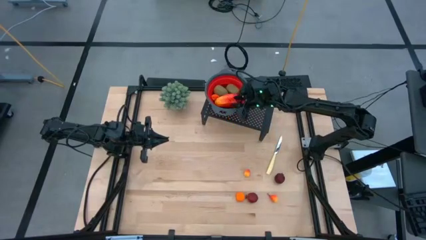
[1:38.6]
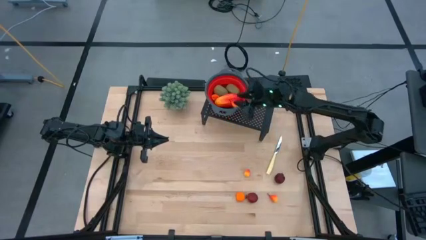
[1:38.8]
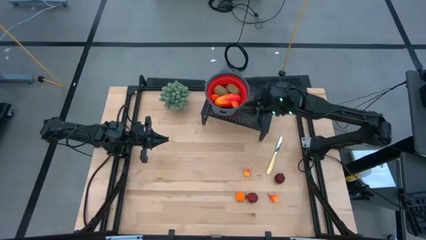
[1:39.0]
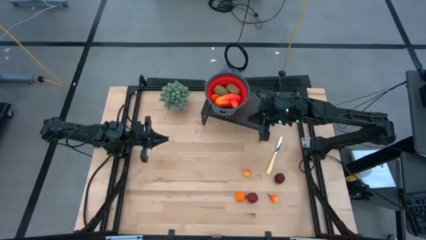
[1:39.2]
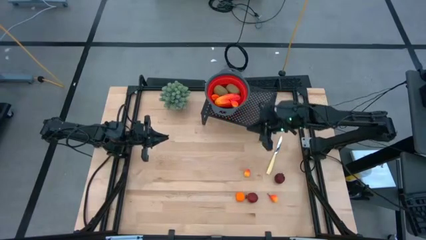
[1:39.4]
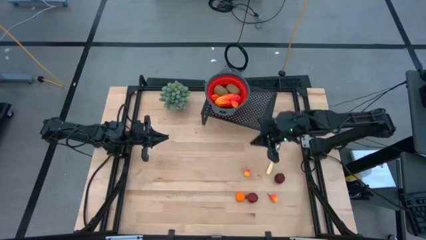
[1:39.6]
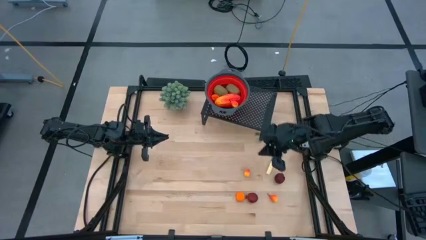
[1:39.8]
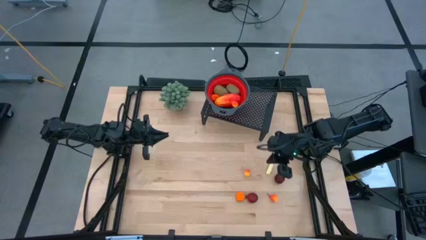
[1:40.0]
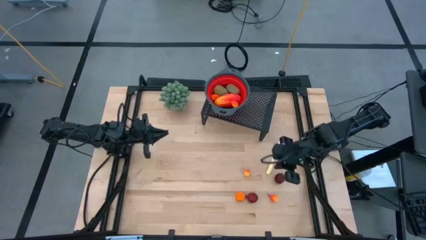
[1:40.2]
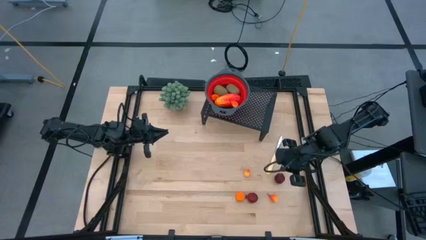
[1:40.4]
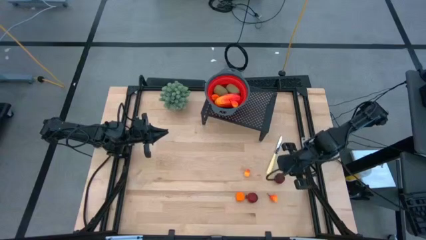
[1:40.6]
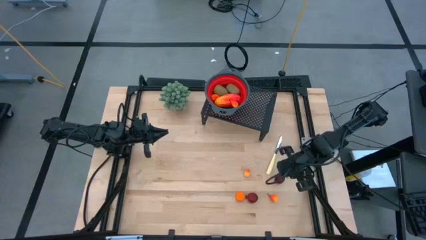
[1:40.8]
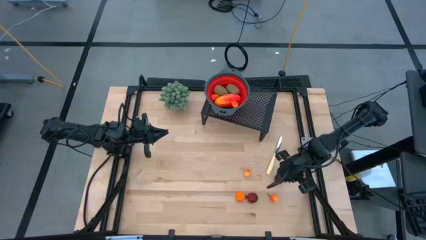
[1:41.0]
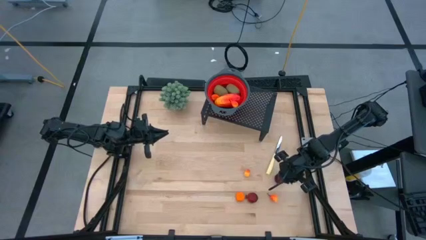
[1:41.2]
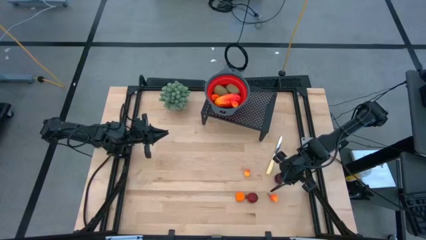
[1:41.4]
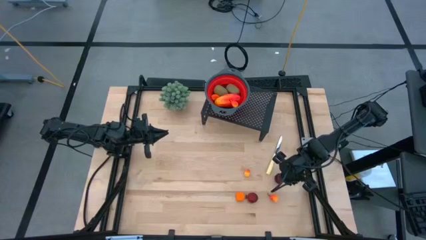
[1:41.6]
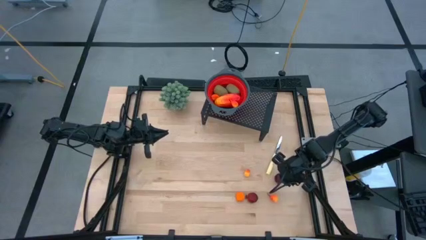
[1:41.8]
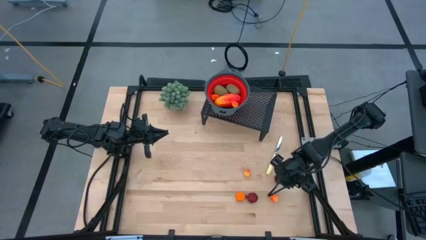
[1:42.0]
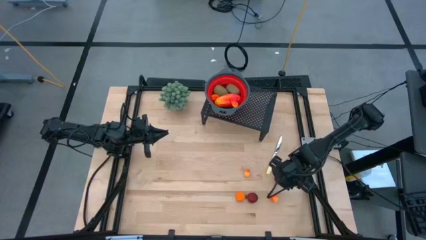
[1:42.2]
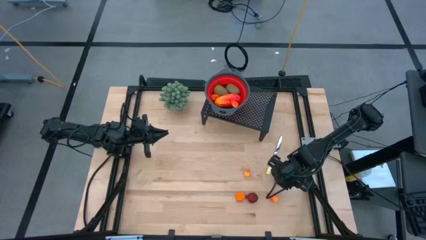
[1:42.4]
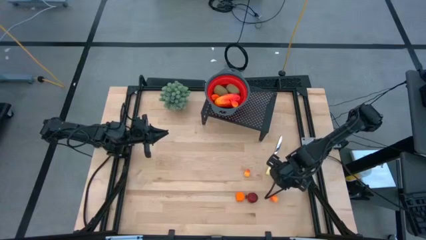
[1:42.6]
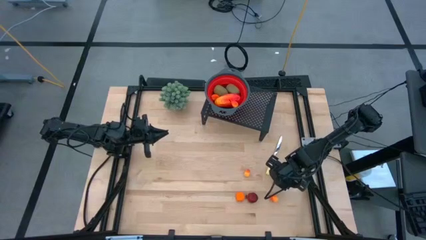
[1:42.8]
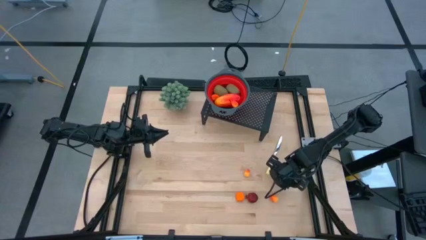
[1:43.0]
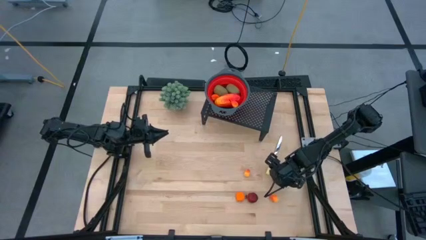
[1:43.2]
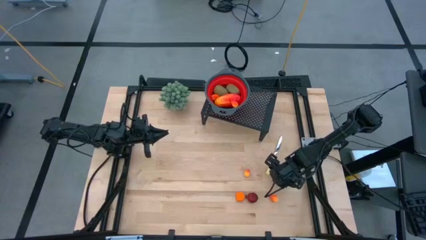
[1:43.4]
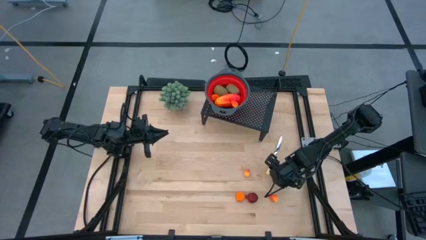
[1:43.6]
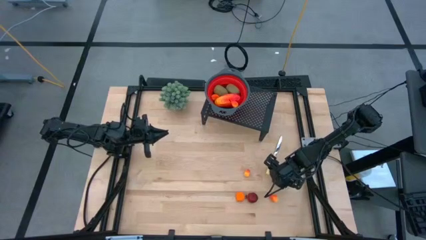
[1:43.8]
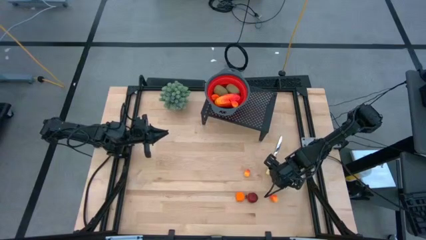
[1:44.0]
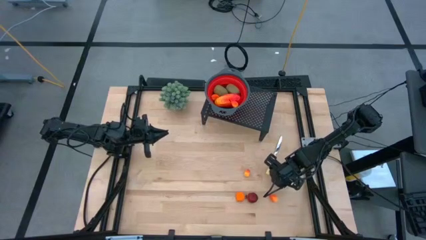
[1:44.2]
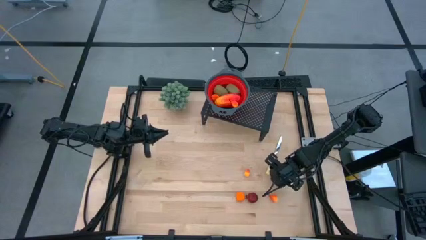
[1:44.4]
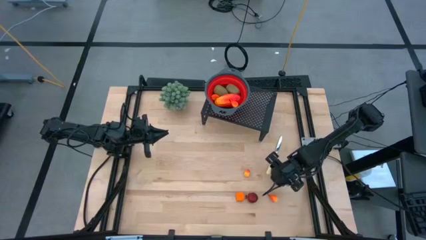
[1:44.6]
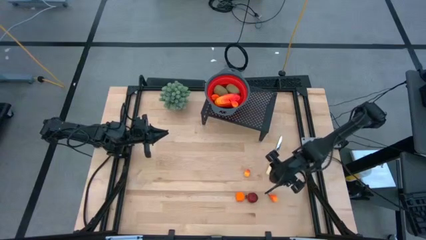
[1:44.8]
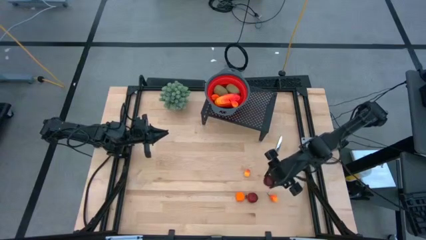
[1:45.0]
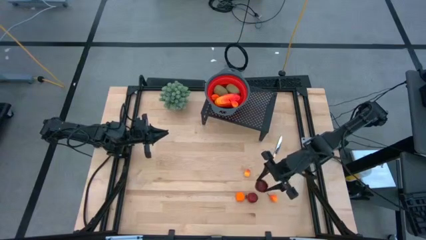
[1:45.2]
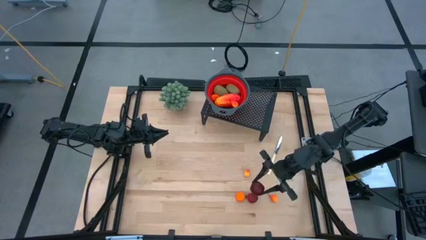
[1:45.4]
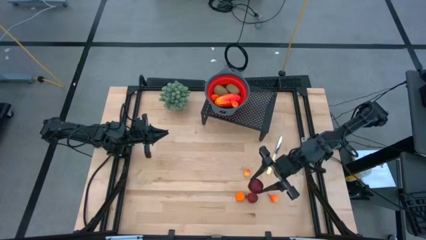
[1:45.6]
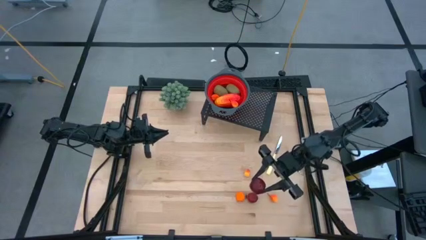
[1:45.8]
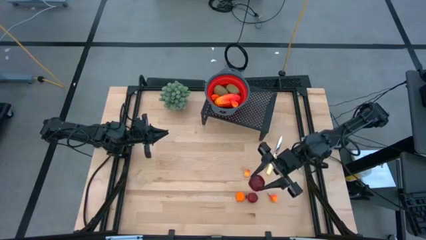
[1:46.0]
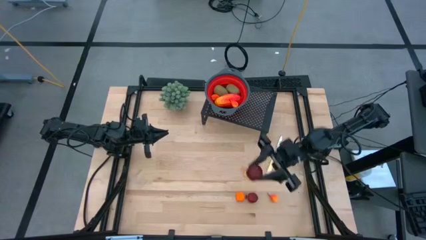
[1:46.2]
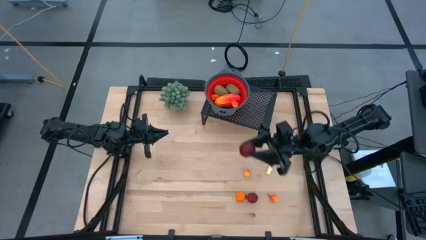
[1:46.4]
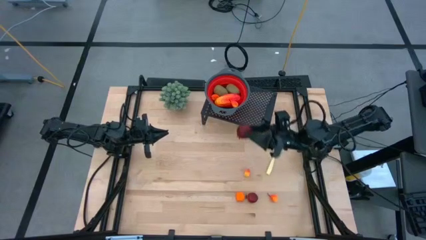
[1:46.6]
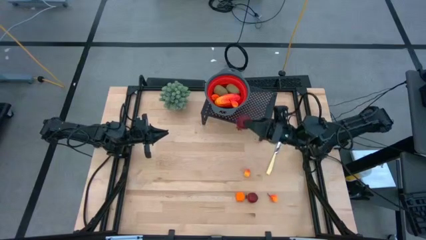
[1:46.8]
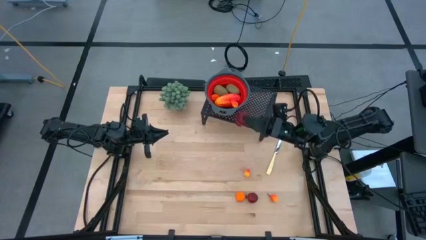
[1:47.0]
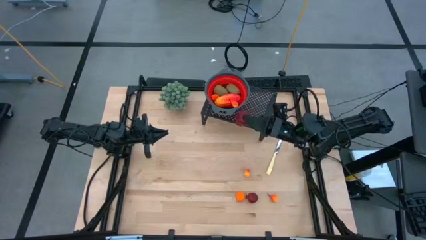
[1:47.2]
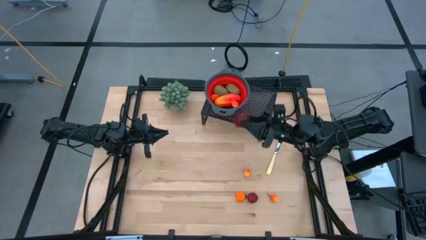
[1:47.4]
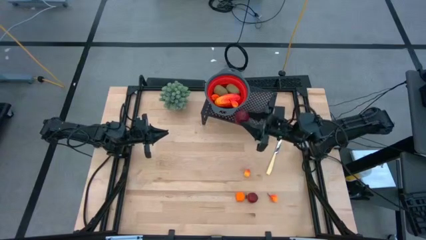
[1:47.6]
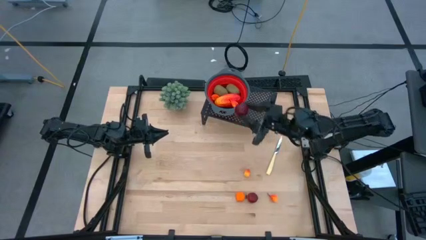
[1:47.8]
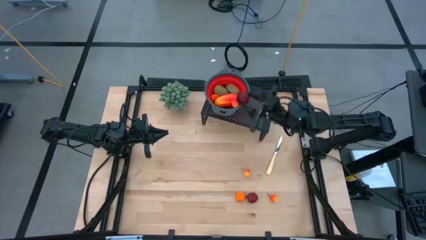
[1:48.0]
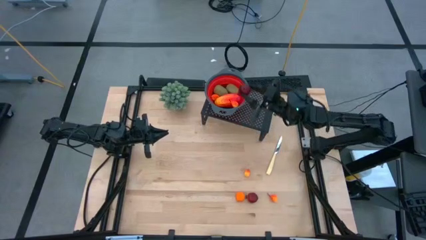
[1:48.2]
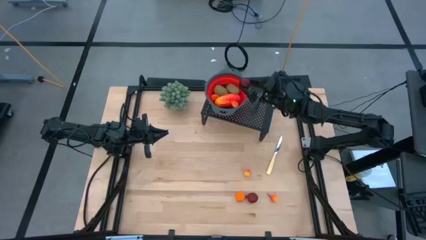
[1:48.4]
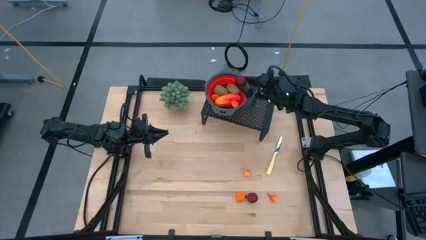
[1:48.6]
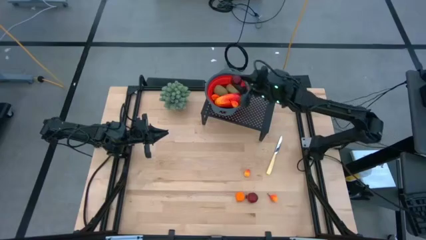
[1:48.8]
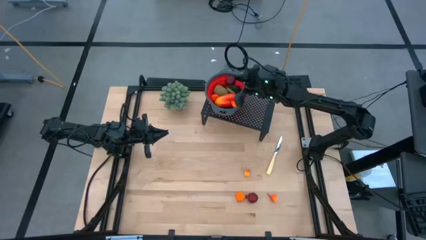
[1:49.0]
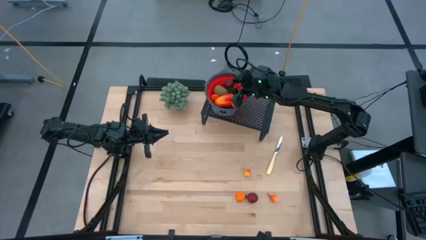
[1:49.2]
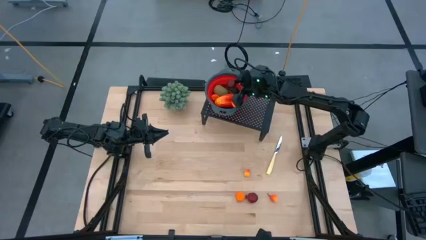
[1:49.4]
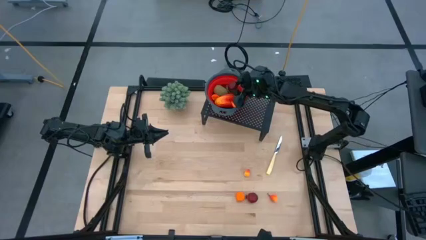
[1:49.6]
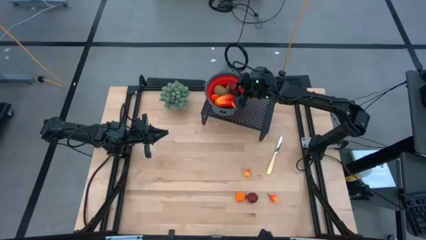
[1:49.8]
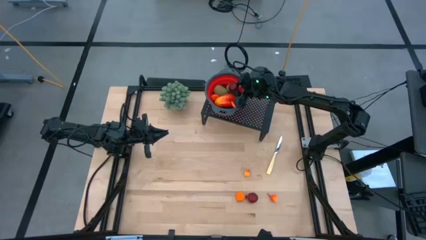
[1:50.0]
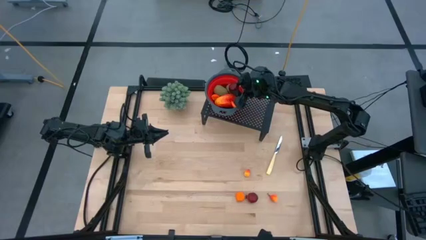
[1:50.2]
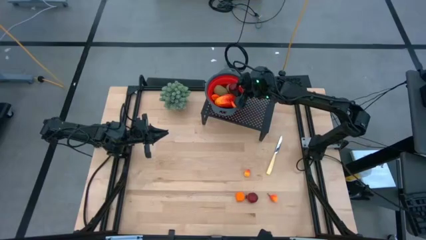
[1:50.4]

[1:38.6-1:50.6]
Task: Pick & Place Fruit
Put the pomegranate into the red strainer bowl
